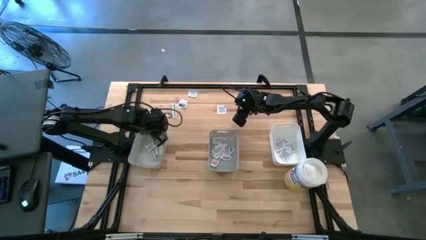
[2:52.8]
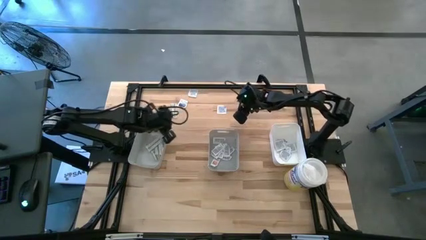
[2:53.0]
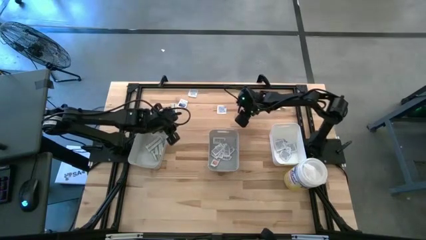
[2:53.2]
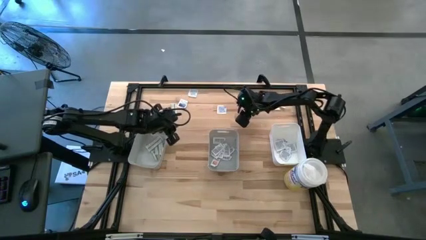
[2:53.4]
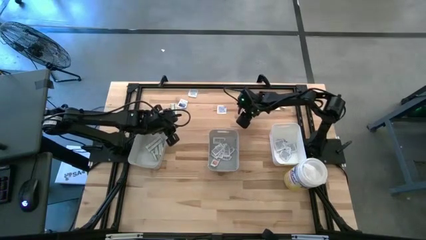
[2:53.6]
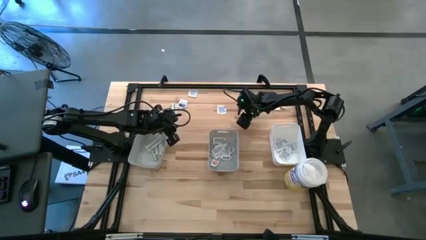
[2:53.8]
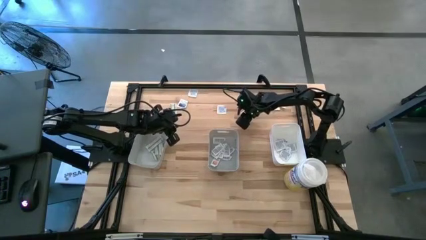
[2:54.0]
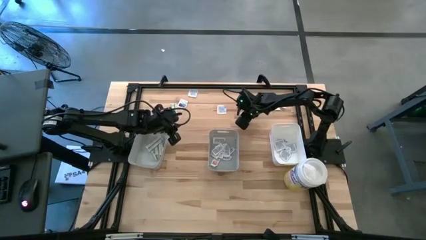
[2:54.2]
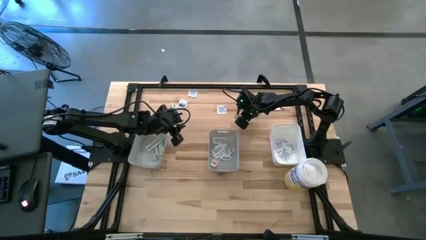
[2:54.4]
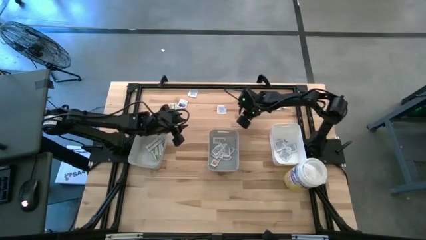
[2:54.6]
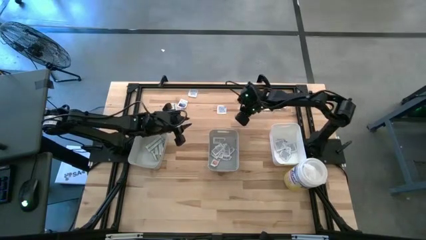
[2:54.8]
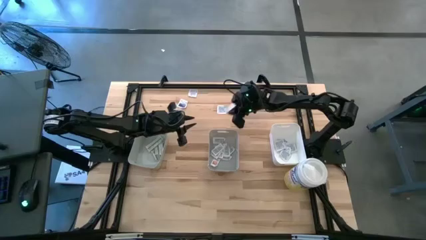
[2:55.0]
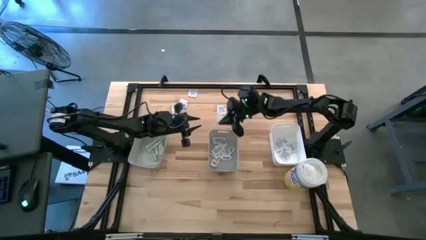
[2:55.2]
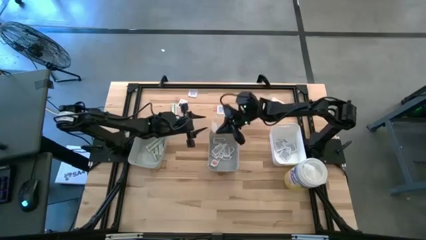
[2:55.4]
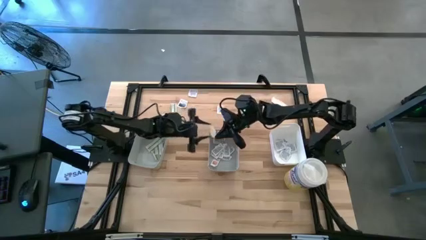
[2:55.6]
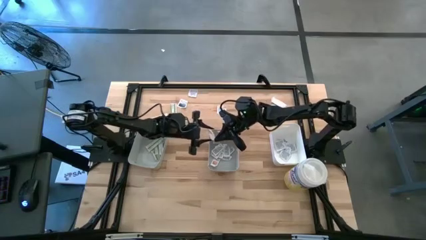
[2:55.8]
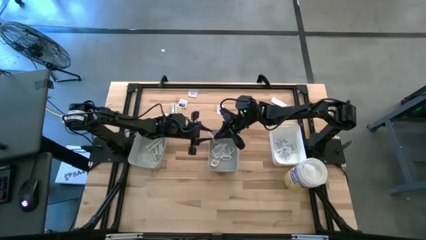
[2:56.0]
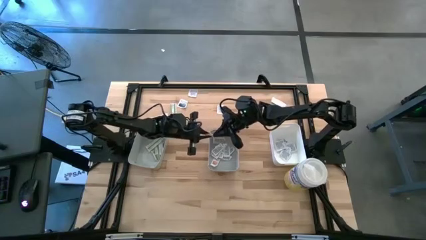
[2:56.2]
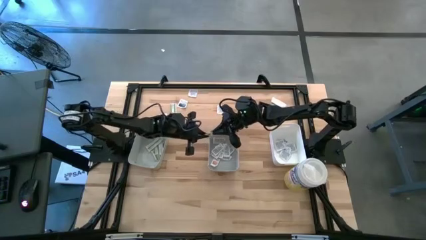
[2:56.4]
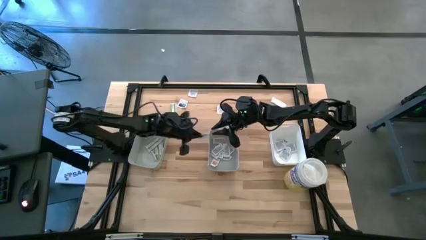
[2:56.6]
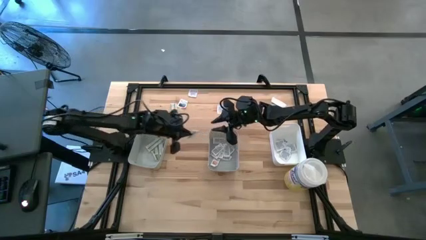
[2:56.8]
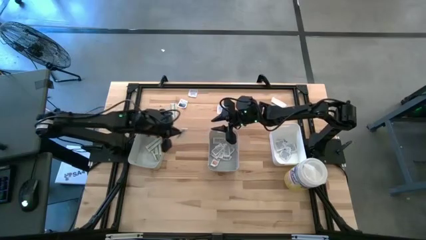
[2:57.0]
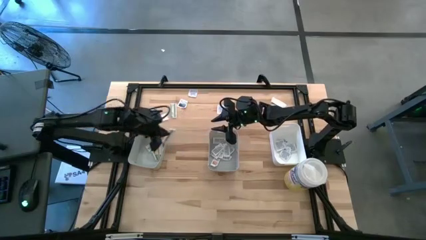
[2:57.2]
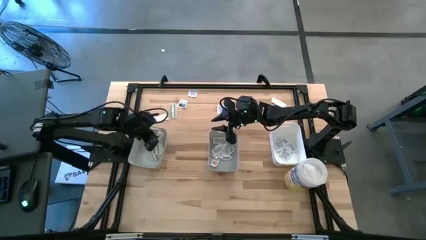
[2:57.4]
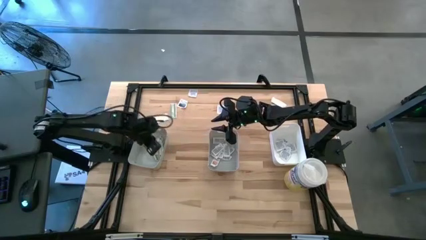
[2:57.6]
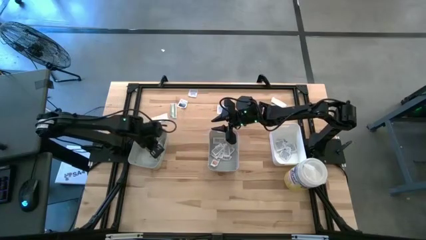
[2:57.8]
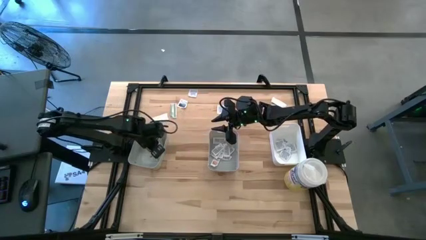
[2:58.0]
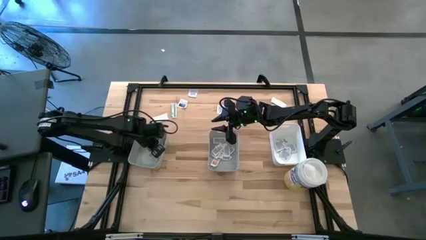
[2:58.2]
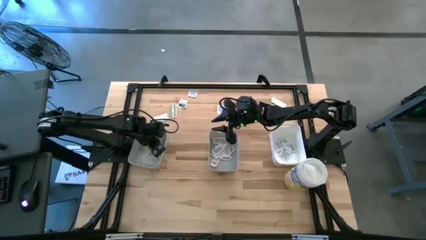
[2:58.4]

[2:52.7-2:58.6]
Task: Pick & Place First Aid Supplies
Put the bandage pack into the left gray bin

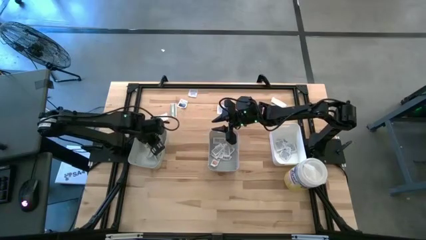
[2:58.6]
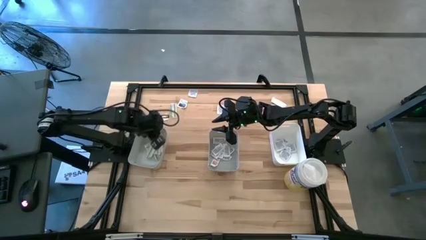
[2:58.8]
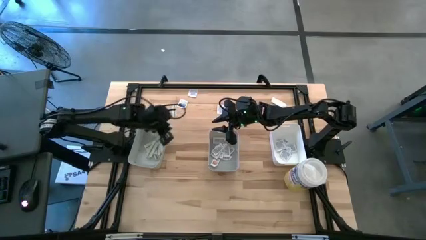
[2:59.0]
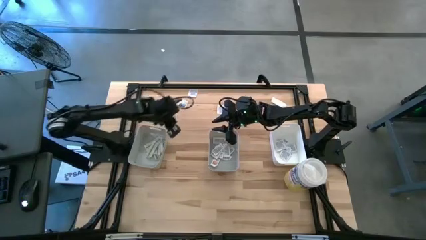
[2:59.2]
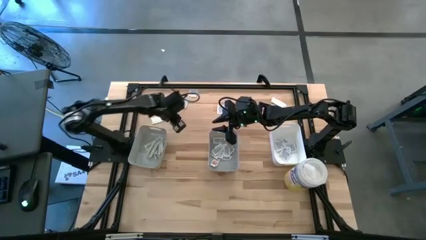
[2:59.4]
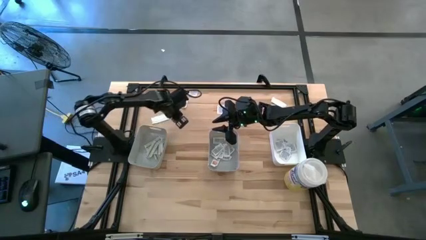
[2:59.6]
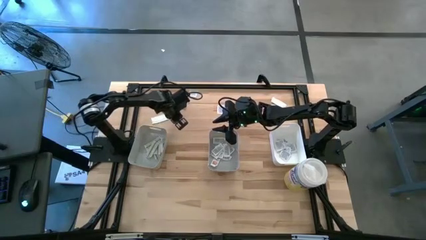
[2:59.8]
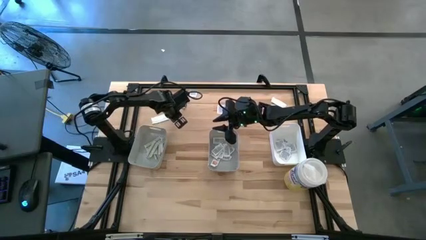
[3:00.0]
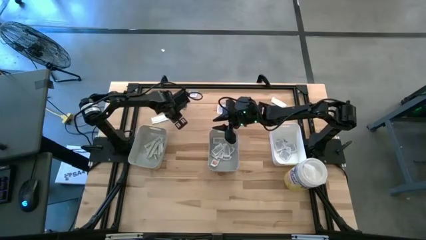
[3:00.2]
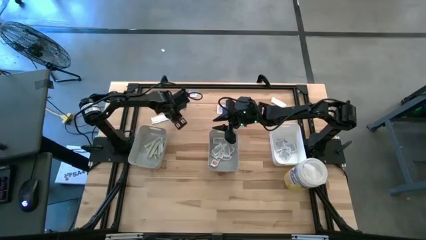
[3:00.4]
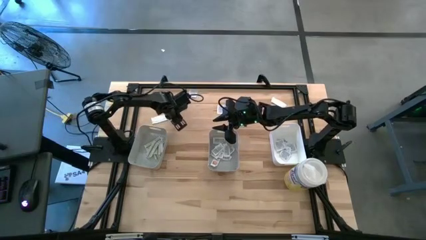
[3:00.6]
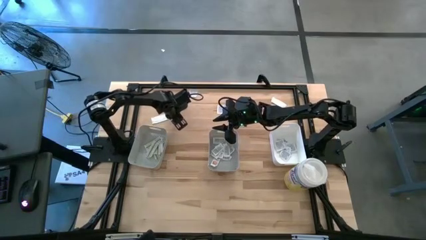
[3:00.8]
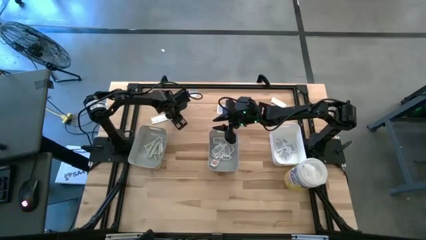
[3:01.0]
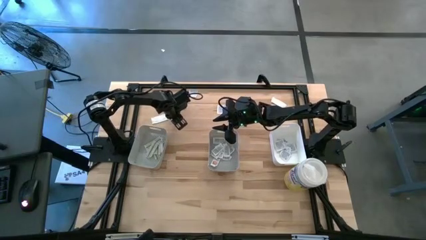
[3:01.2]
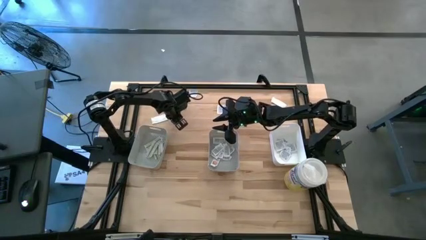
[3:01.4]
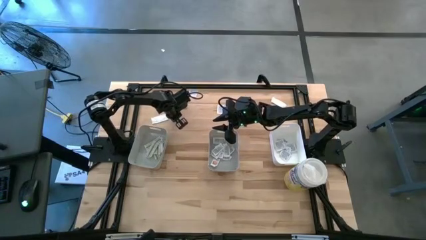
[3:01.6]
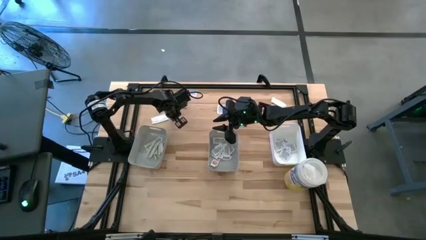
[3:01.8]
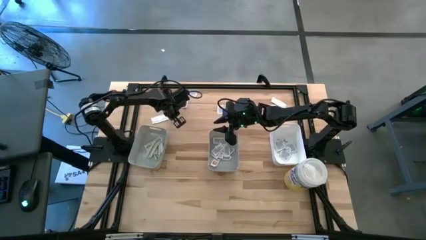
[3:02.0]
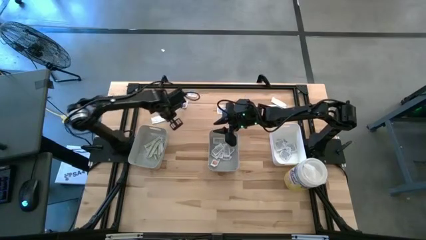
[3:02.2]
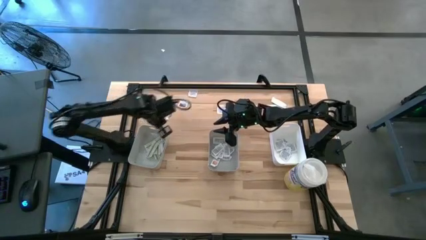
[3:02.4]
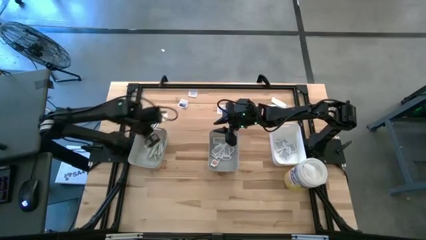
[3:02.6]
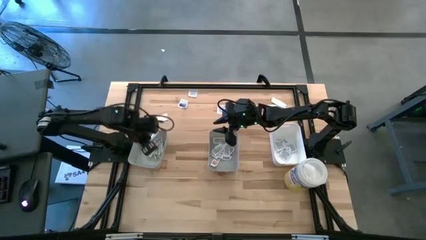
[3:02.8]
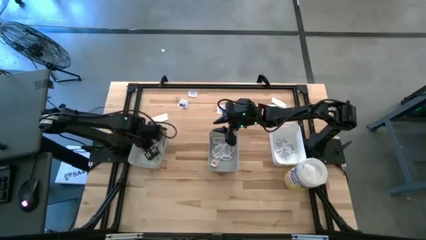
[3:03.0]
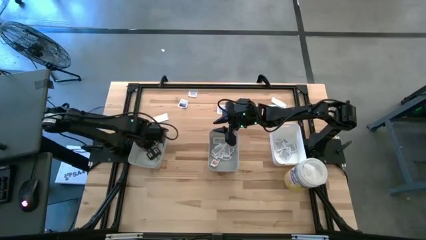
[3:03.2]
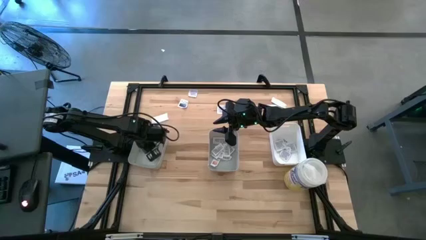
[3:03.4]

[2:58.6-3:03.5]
Put the bandage pack into the left gray bin

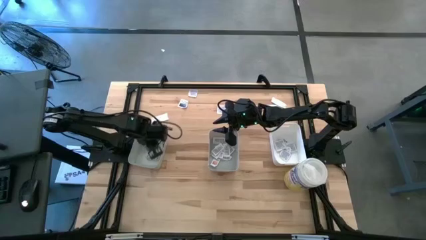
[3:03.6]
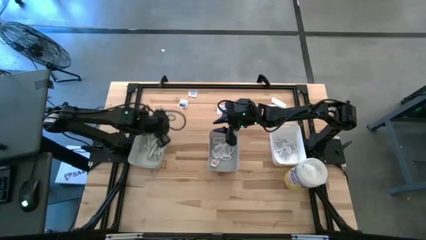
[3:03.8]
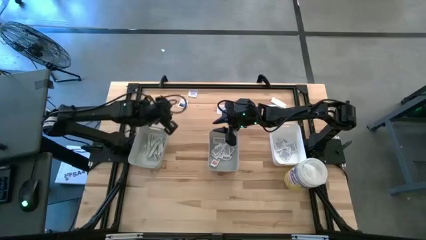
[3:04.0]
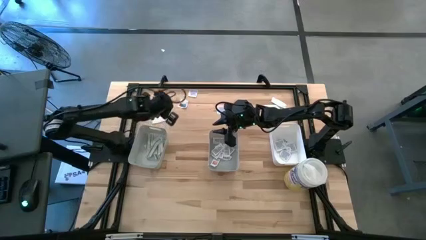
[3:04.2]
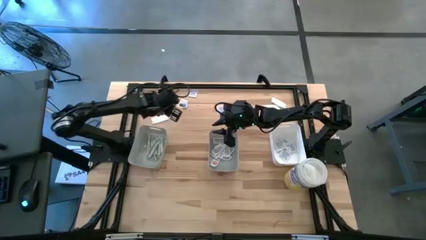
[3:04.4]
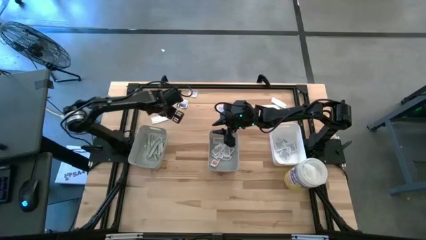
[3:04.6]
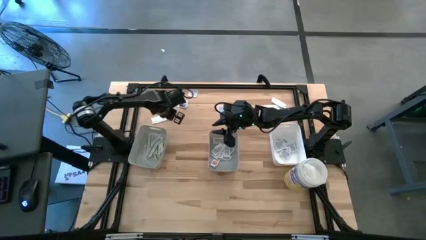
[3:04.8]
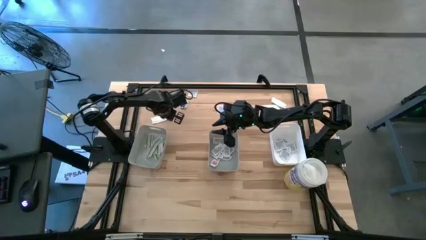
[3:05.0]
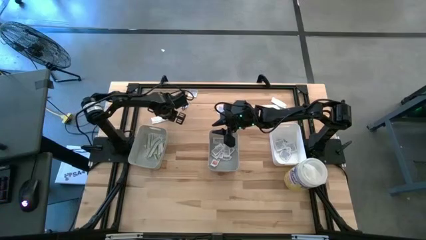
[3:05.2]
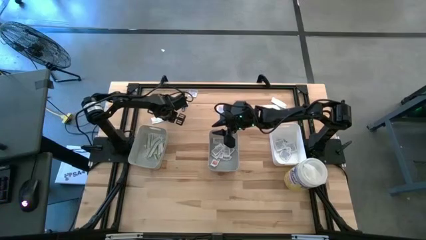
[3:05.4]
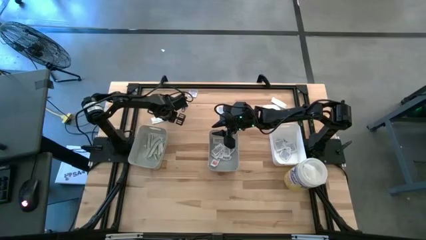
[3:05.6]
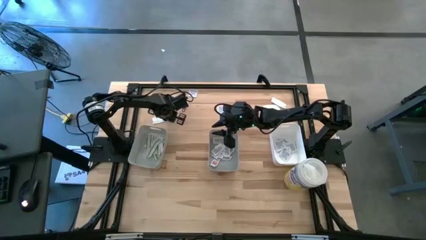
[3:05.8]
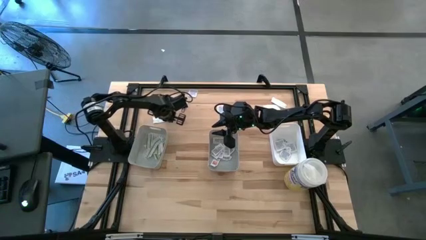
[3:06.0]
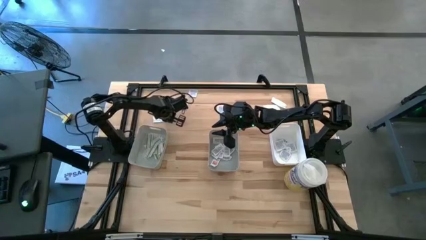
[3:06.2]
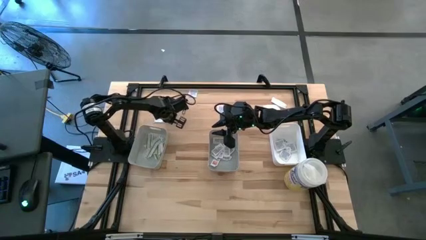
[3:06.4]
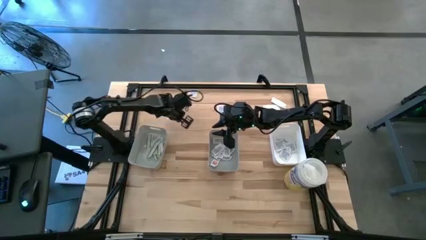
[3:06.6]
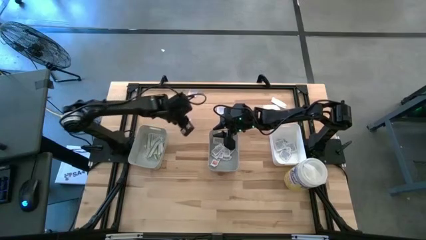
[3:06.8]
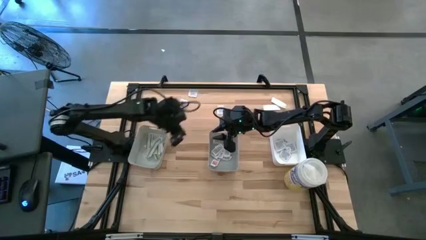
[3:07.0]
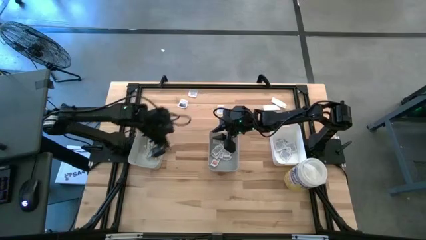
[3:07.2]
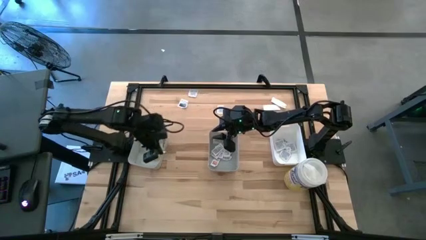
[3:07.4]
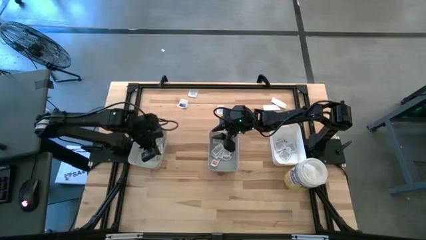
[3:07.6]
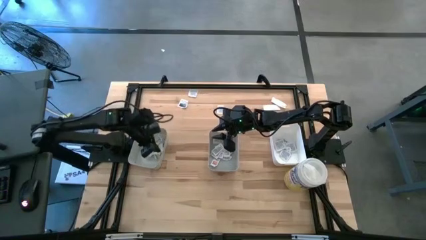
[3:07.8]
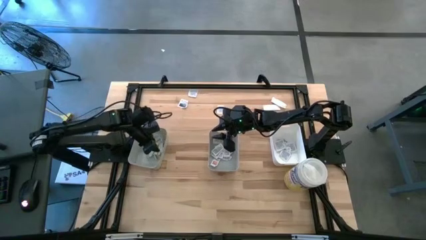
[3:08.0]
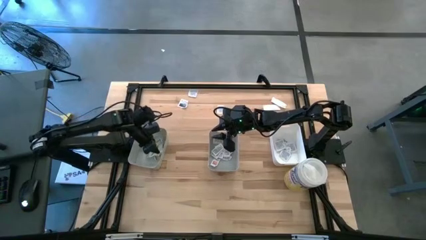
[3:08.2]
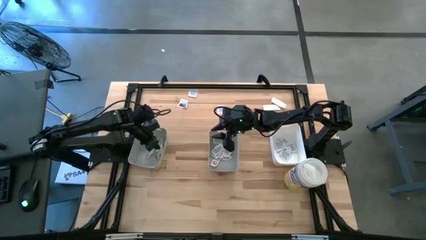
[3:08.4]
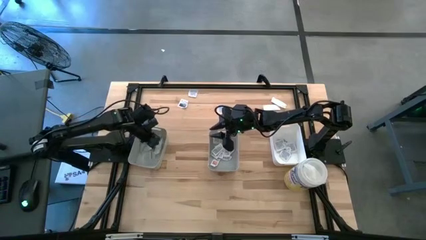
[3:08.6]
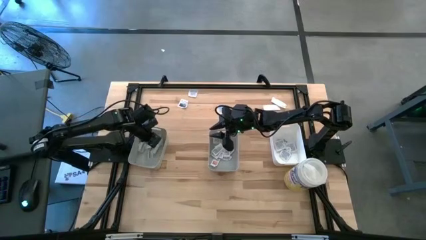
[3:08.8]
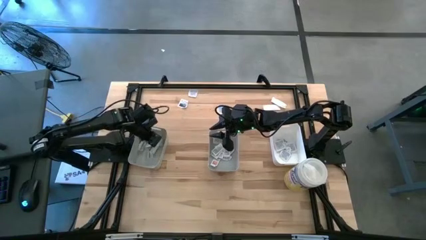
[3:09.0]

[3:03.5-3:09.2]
Put the bandage pack into the left gray bin

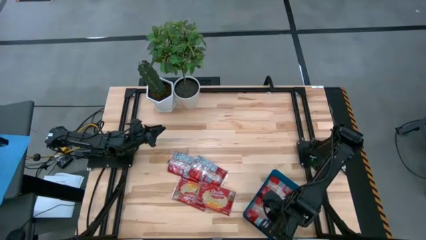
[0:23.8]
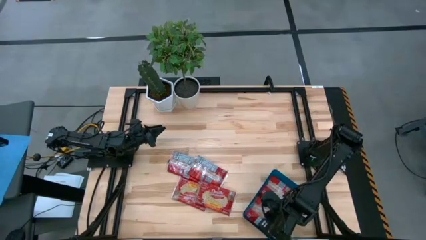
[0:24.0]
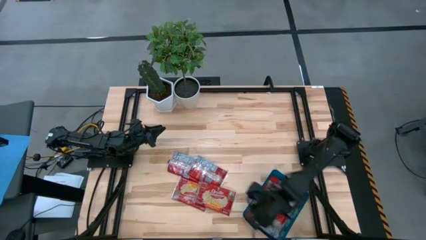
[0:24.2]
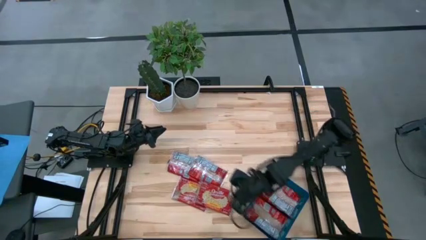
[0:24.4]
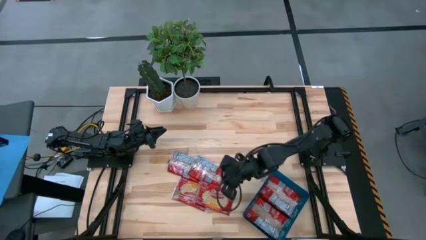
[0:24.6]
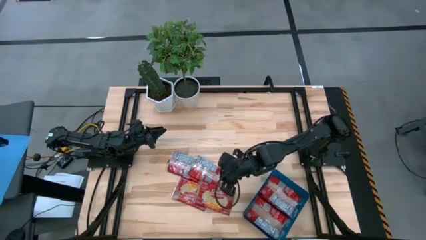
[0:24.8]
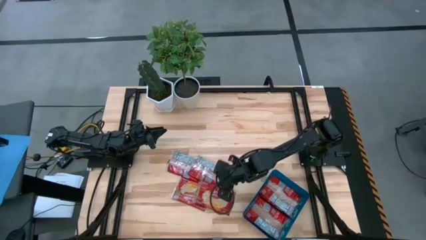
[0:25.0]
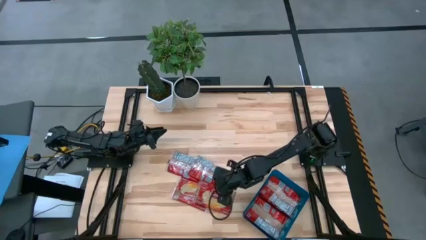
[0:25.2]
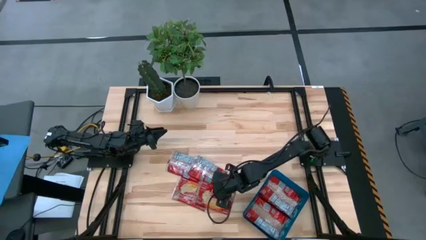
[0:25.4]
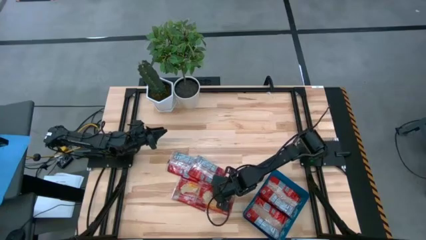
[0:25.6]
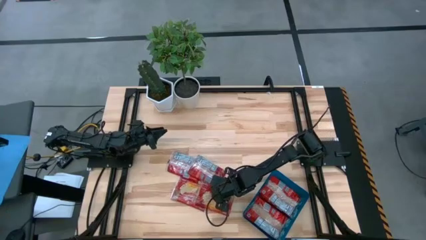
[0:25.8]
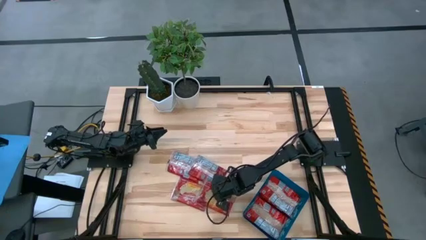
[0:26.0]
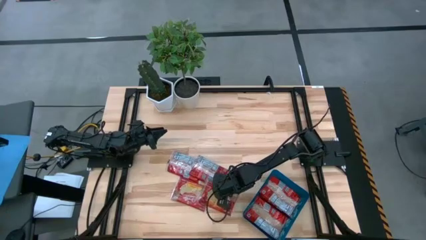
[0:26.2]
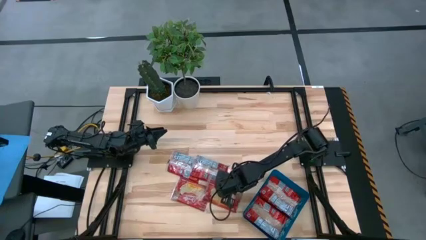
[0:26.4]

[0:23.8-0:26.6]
Task: Sort popcorn bags into baskets
Put the red popcorn bag into the blue bin
